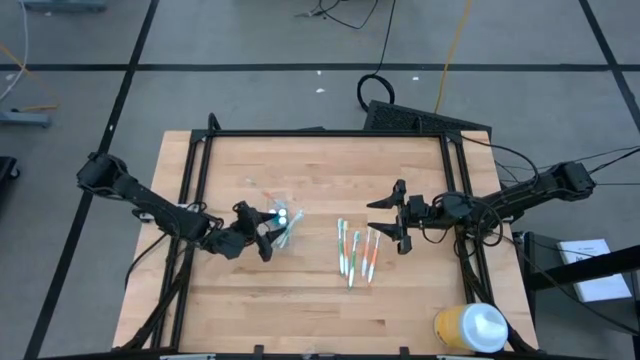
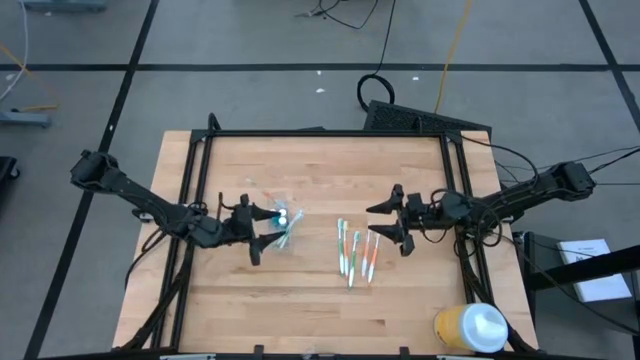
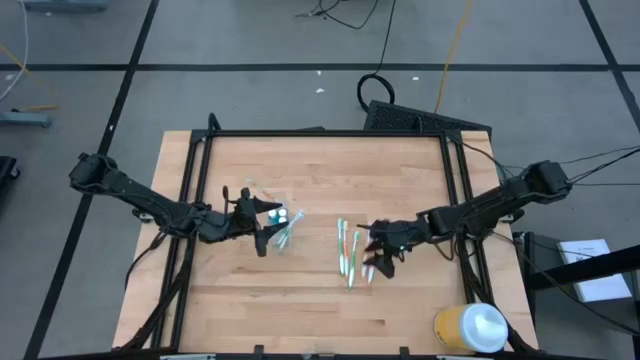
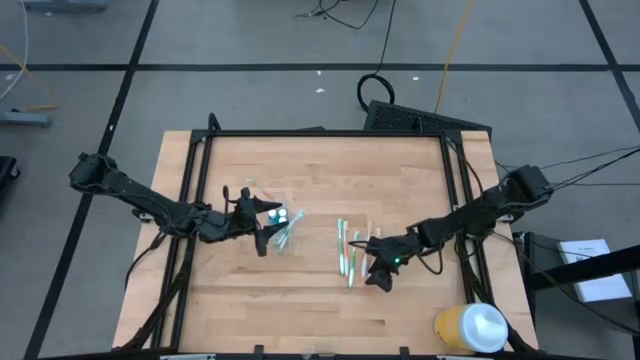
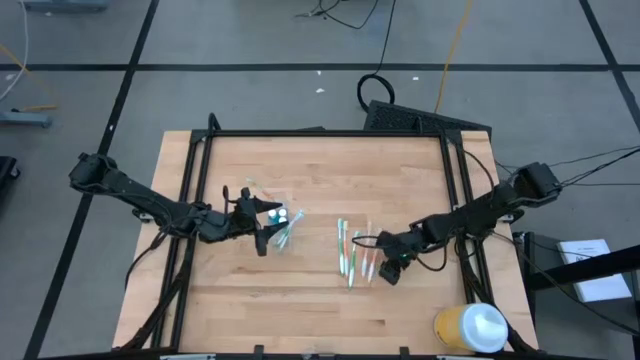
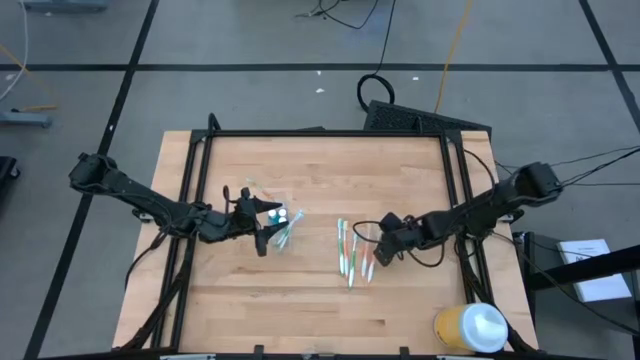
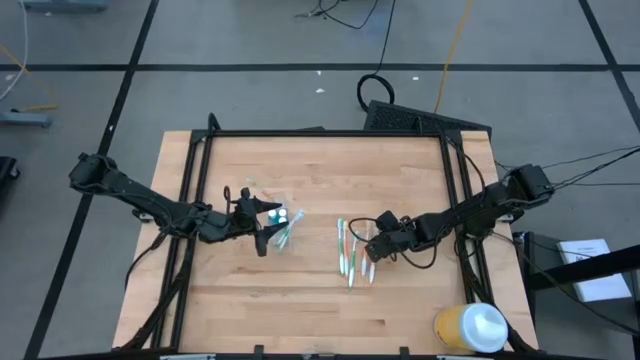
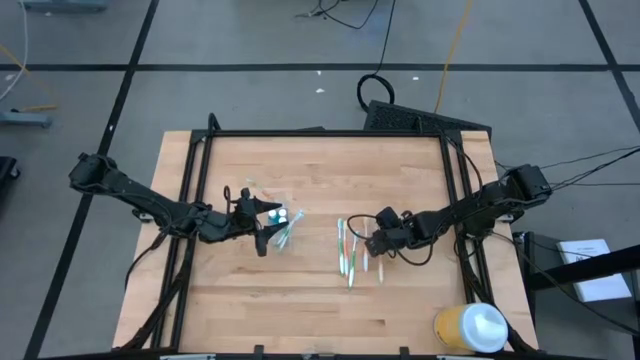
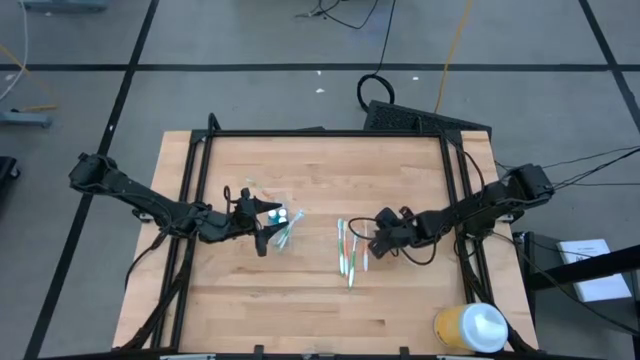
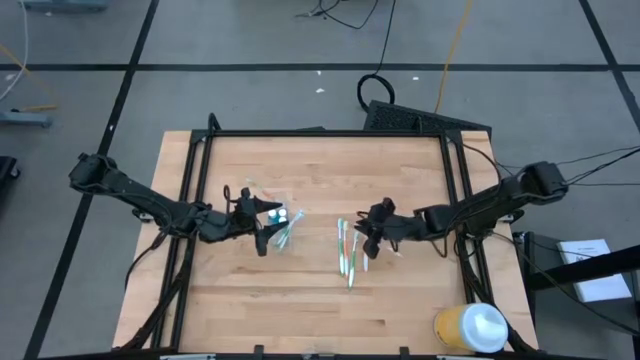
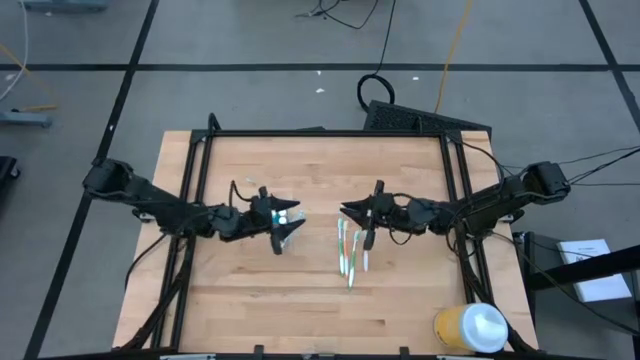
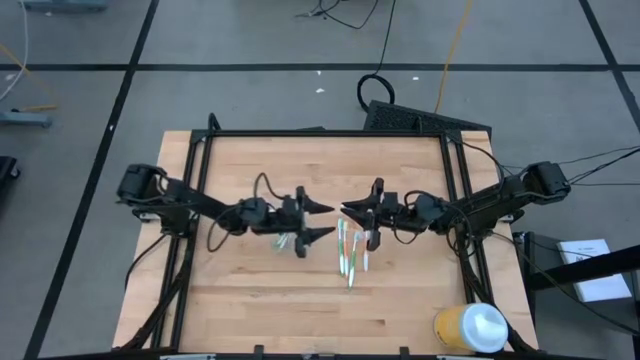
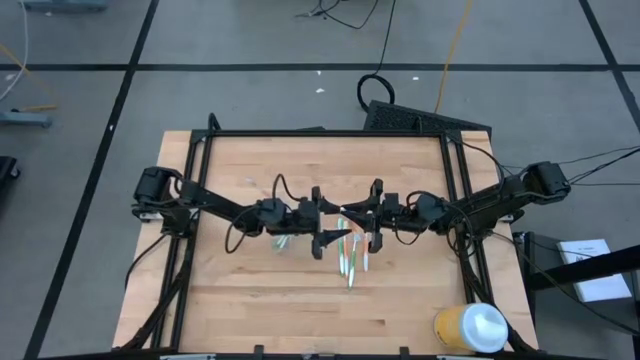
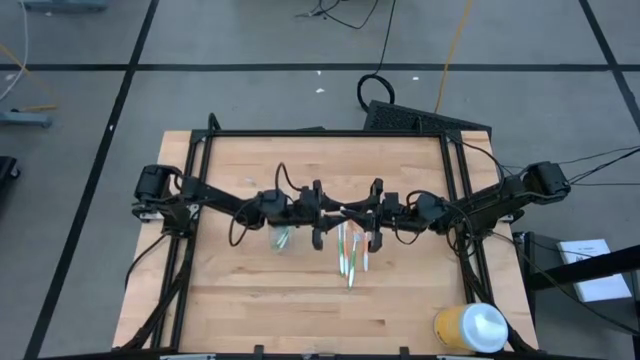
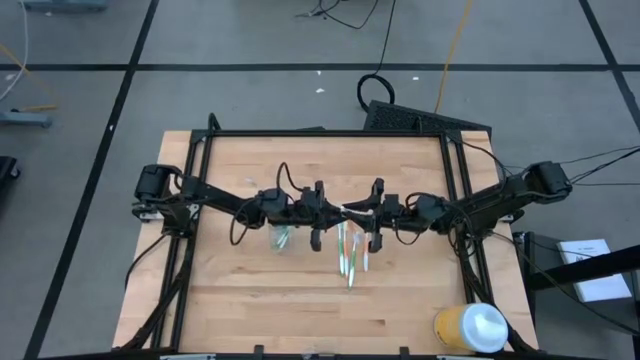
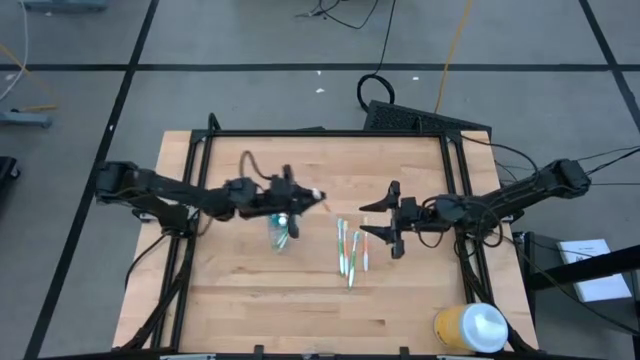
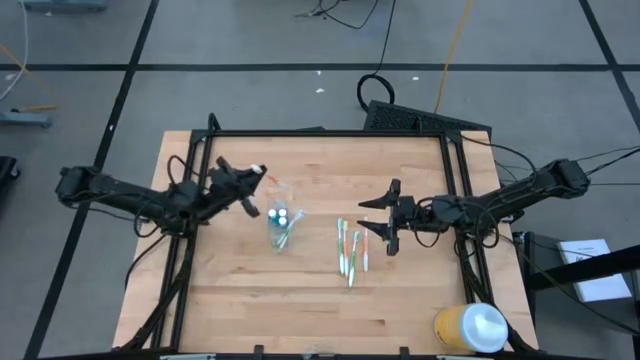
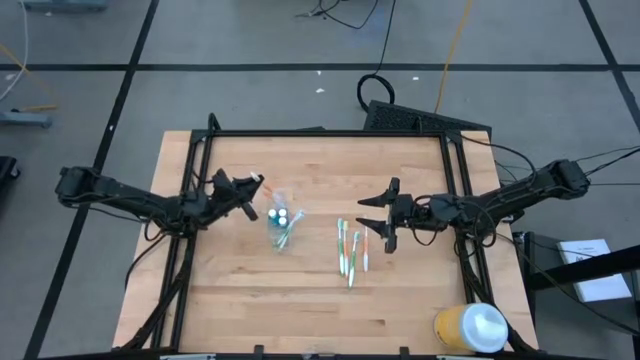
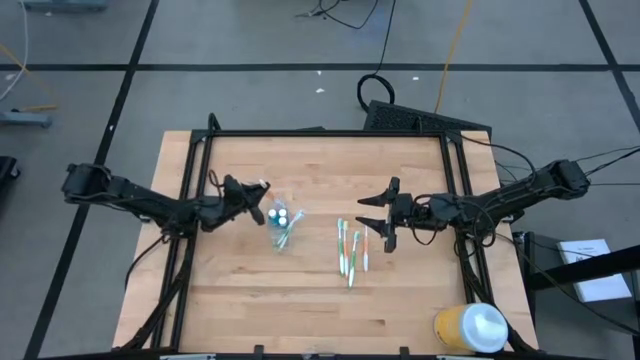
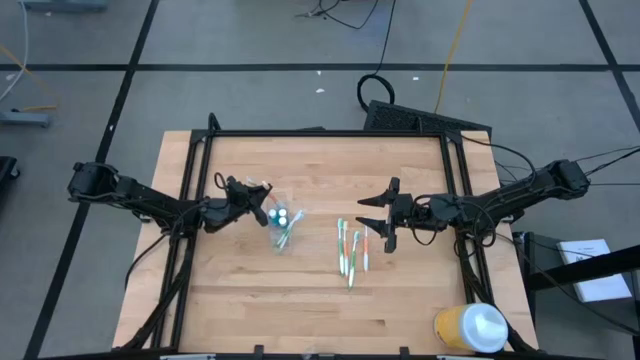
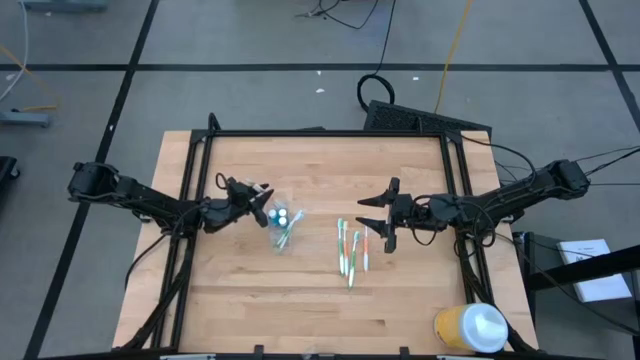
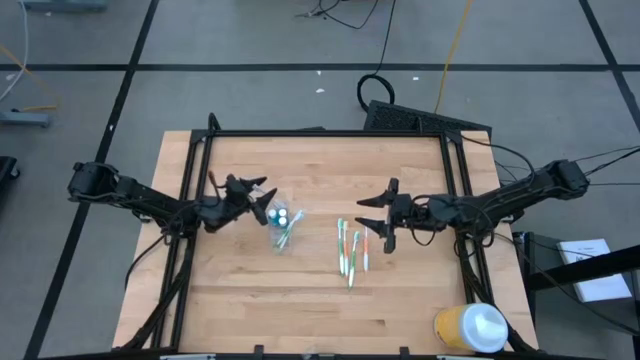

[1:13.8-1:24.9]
Task: Pick & Place toothbrushing station
Put the orange toothbrush in the transparent organizer

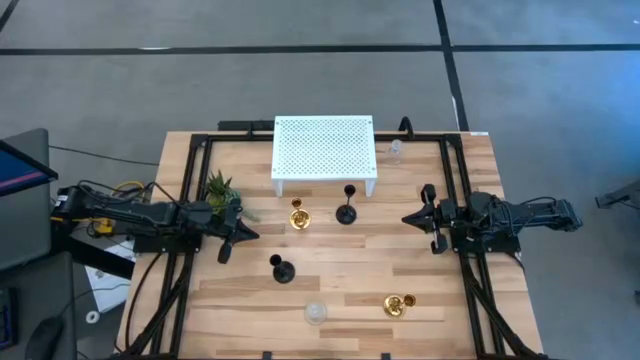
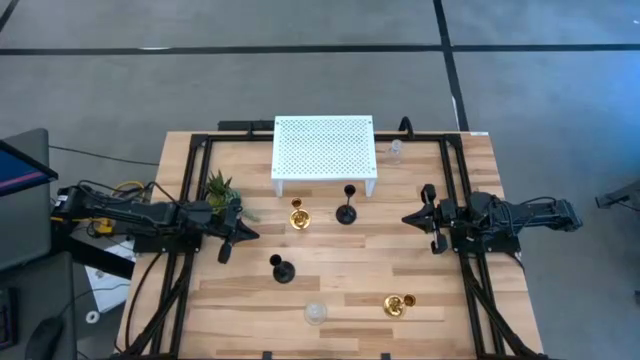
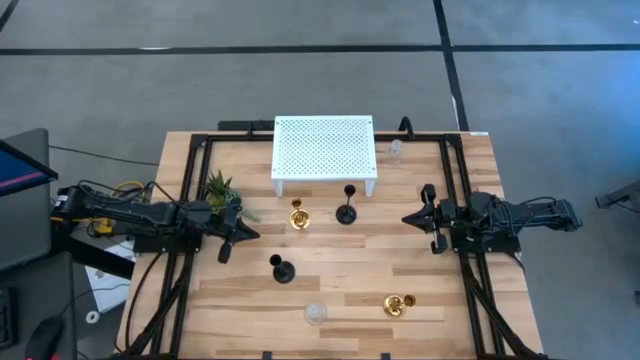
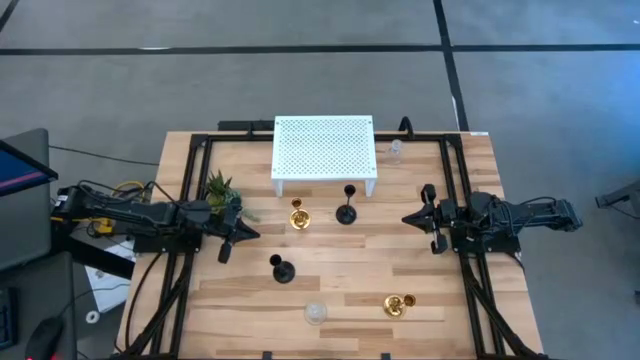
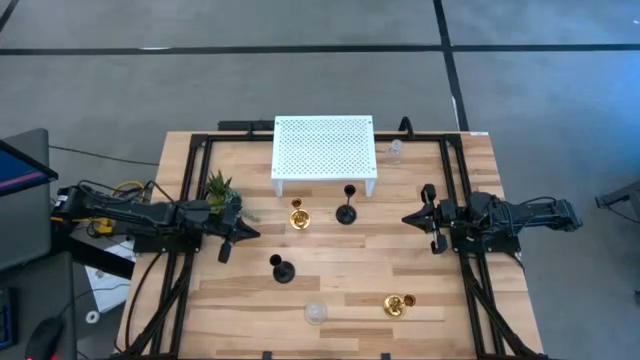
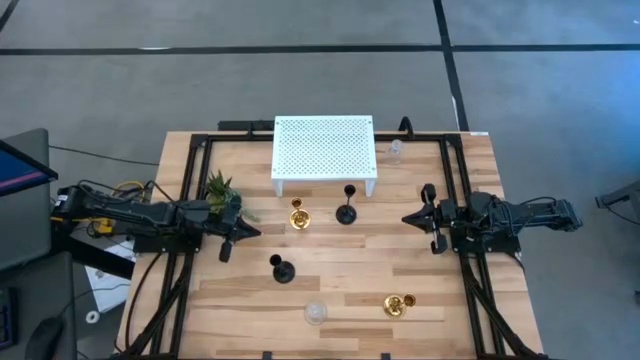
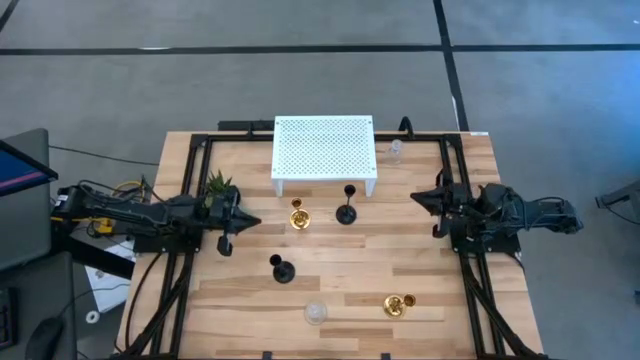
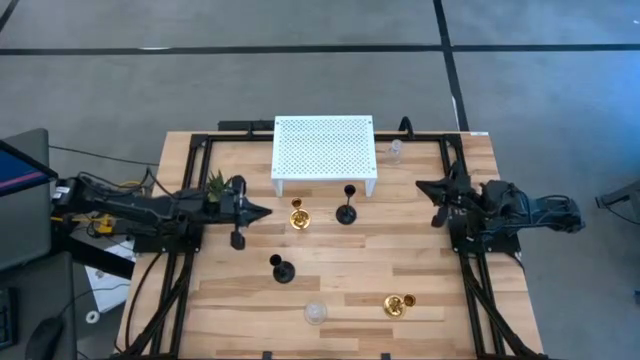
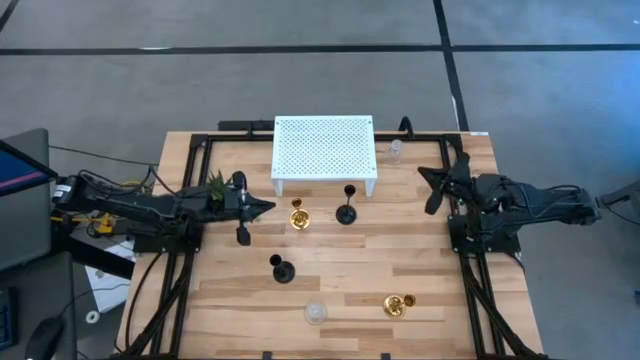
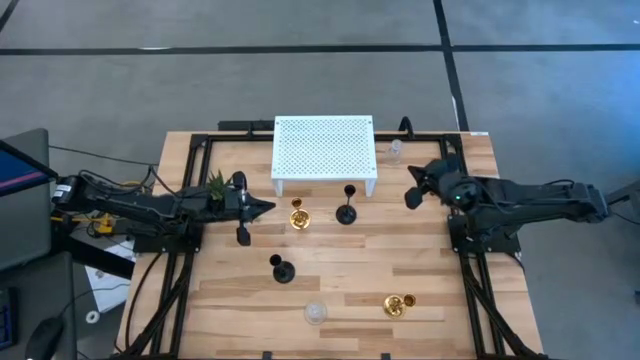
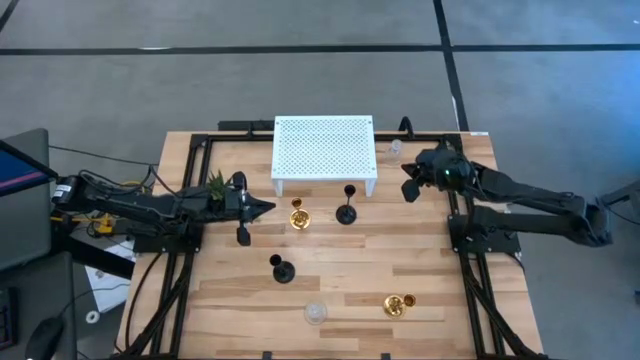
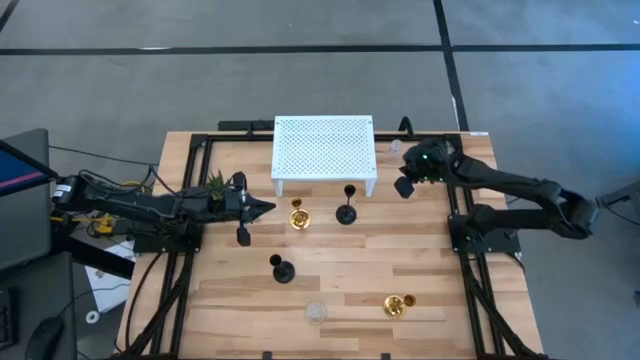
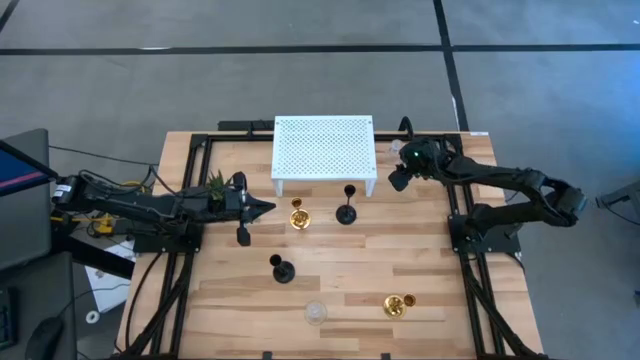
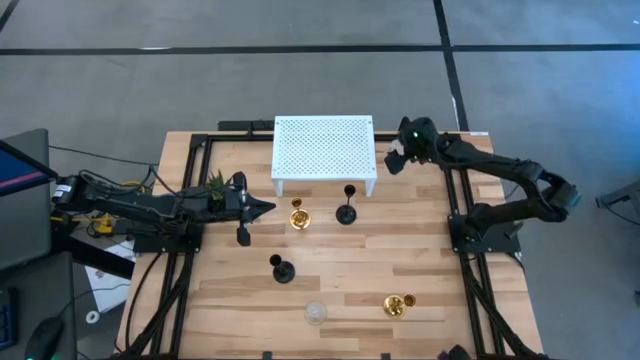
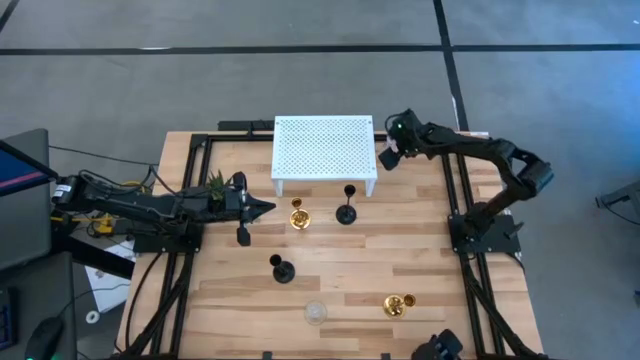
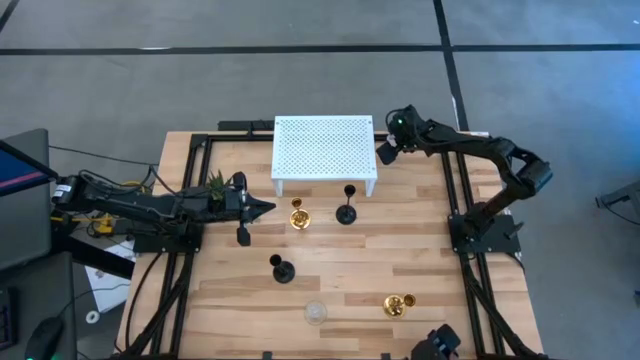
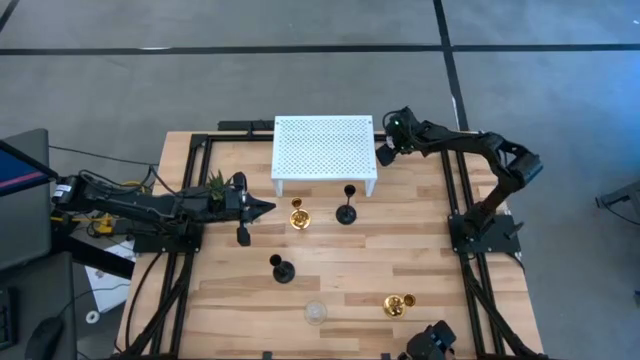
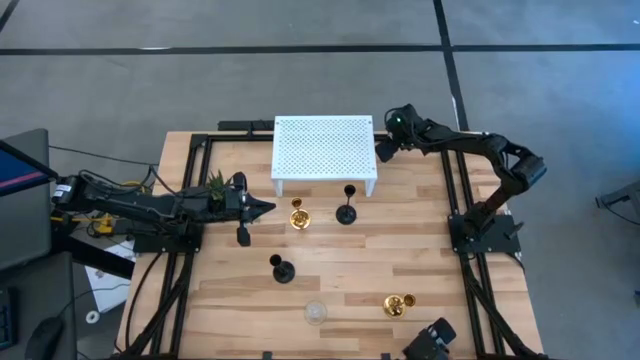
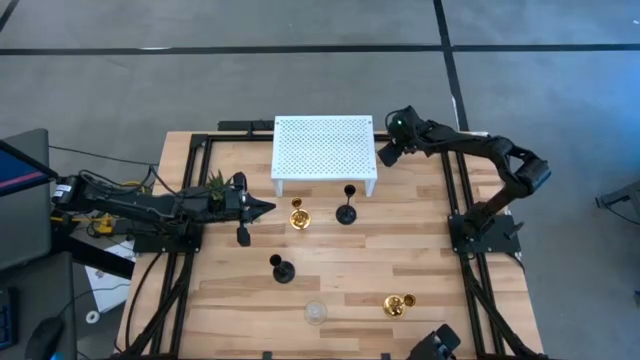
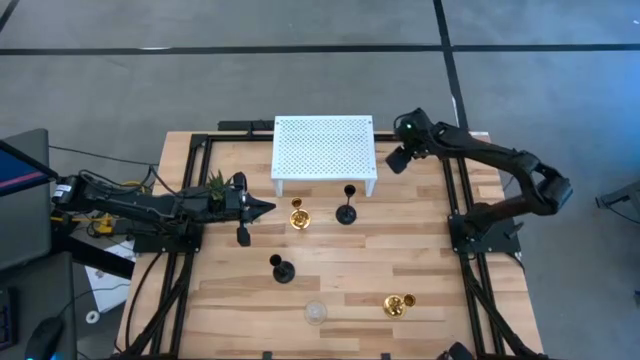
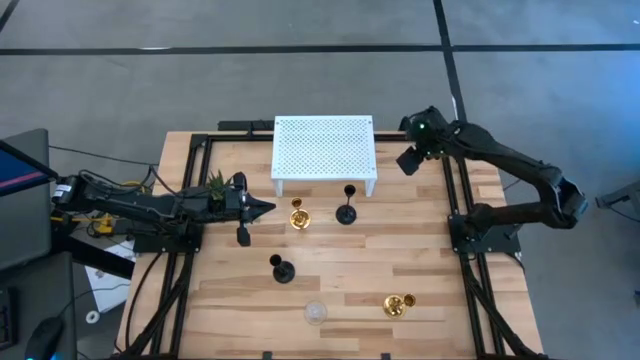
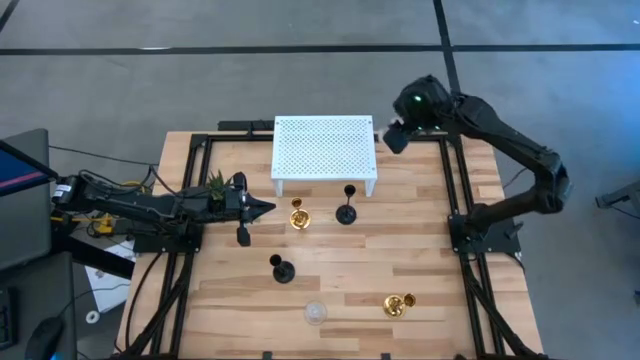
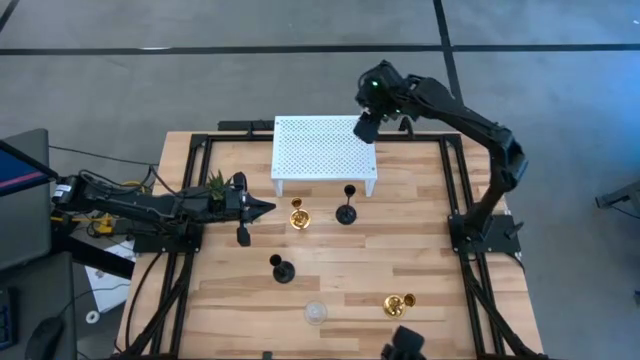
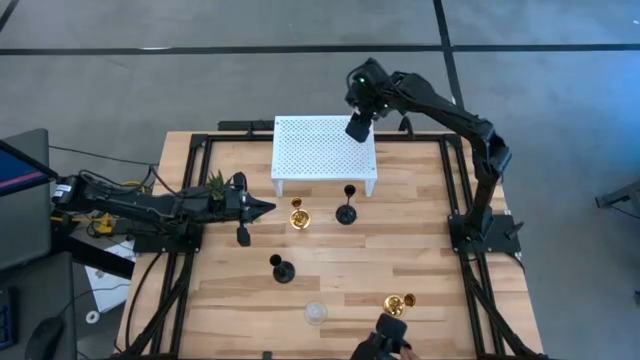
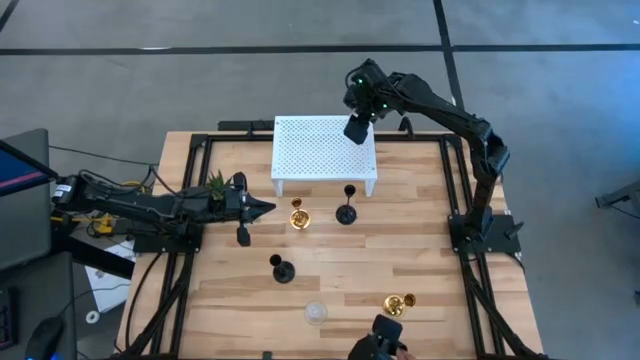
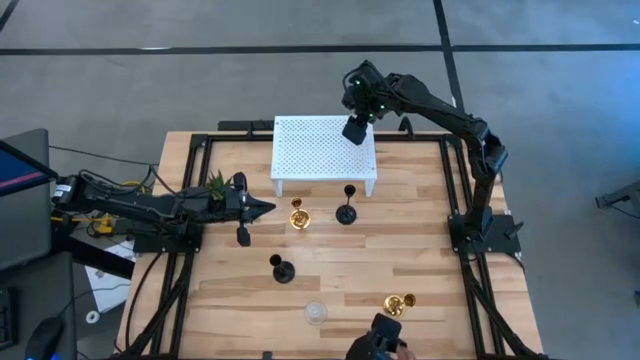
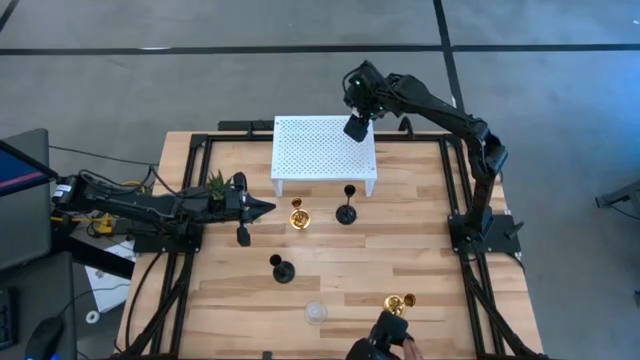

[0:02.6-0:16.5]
Task: Pick & Place candle stick holders
Put the top transparent glass candle holder on the shelf
